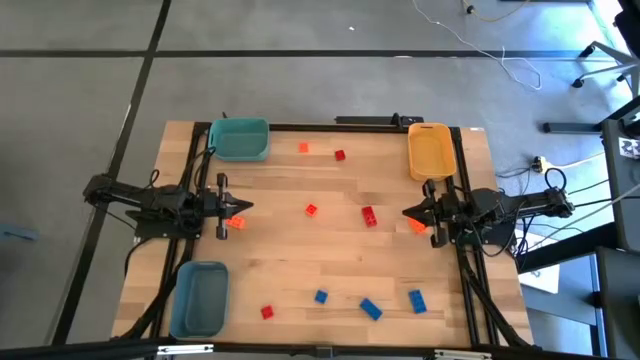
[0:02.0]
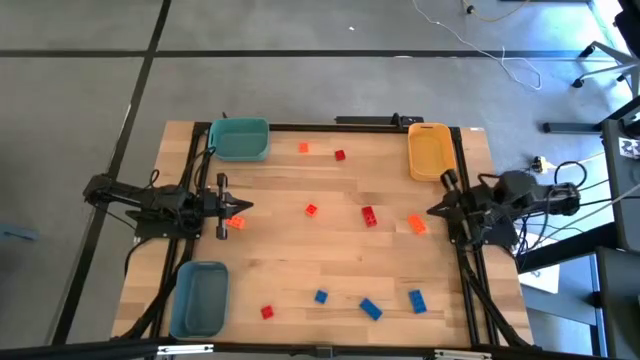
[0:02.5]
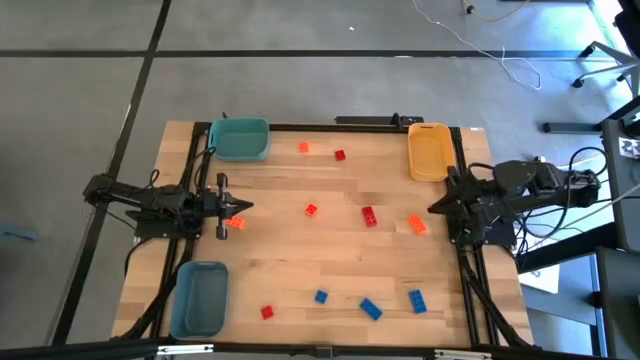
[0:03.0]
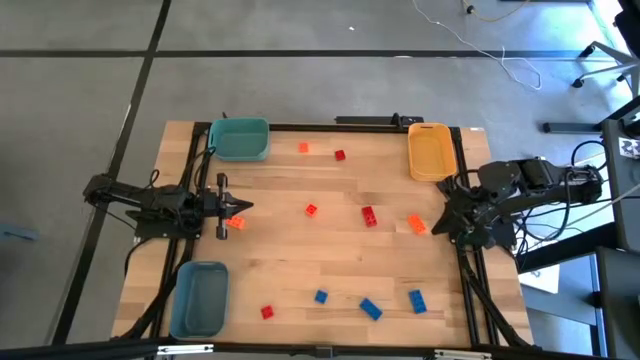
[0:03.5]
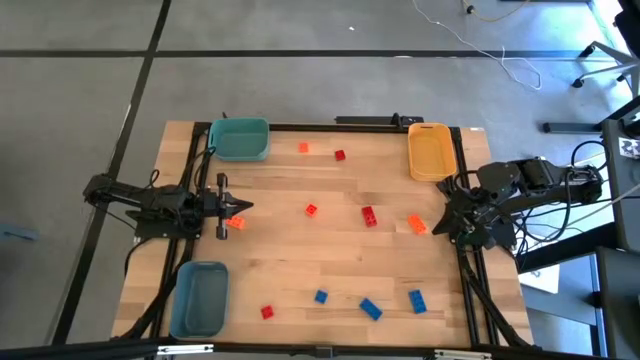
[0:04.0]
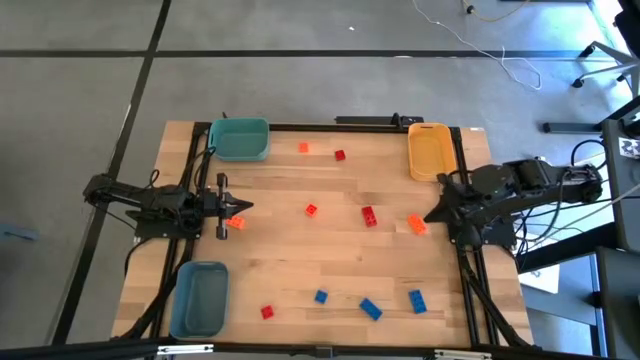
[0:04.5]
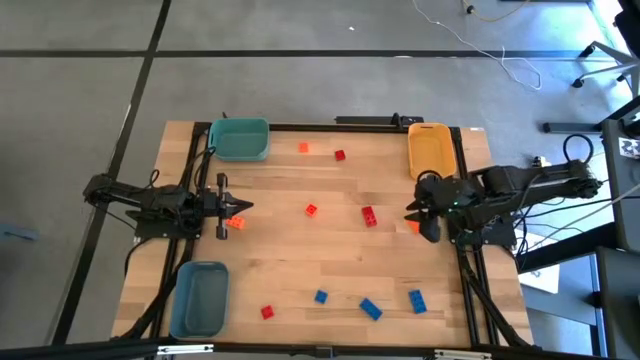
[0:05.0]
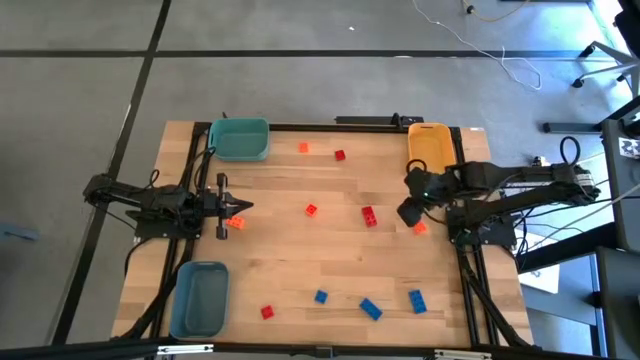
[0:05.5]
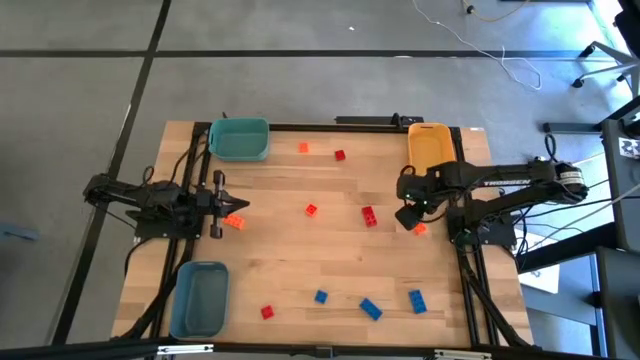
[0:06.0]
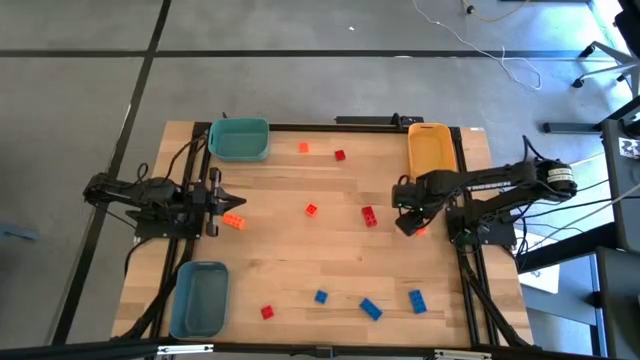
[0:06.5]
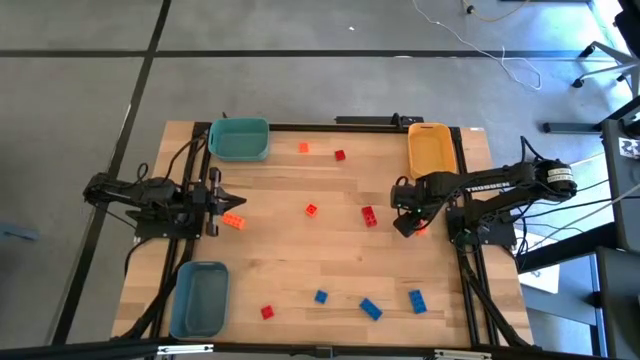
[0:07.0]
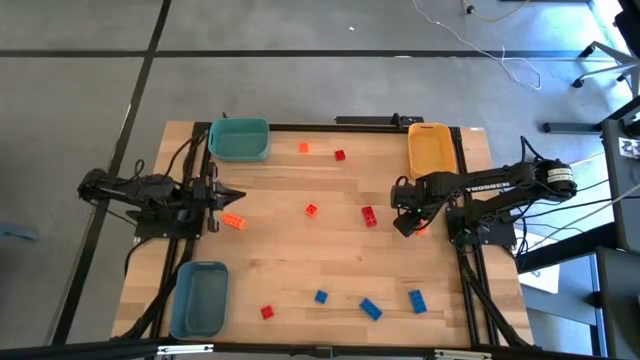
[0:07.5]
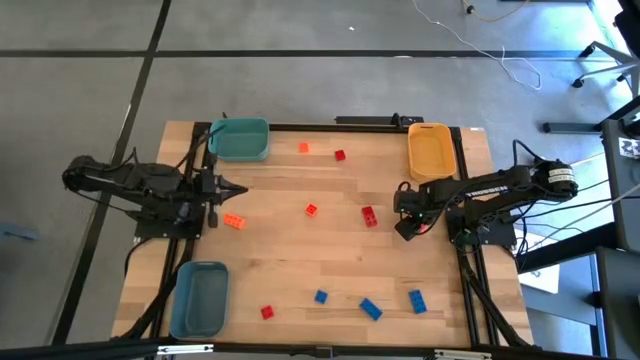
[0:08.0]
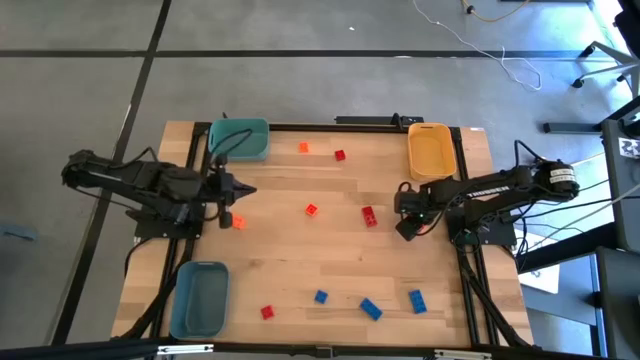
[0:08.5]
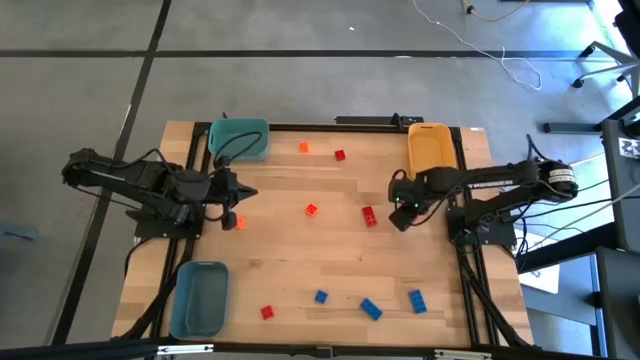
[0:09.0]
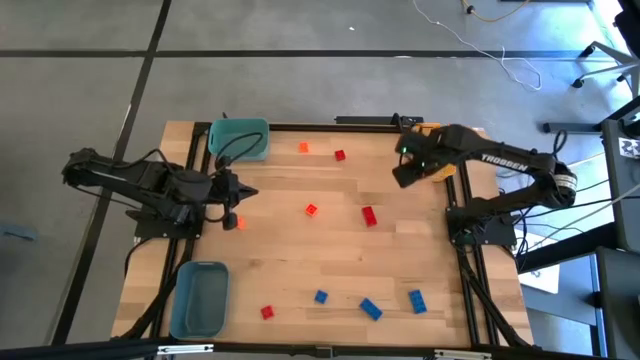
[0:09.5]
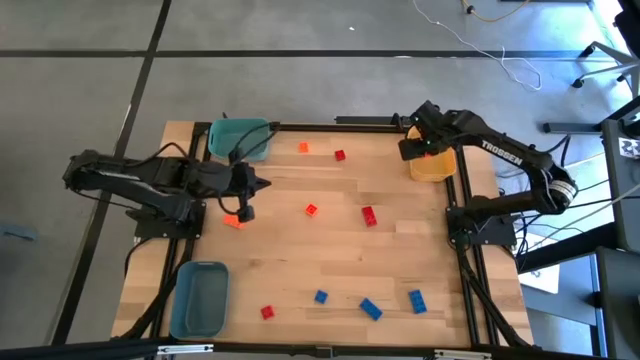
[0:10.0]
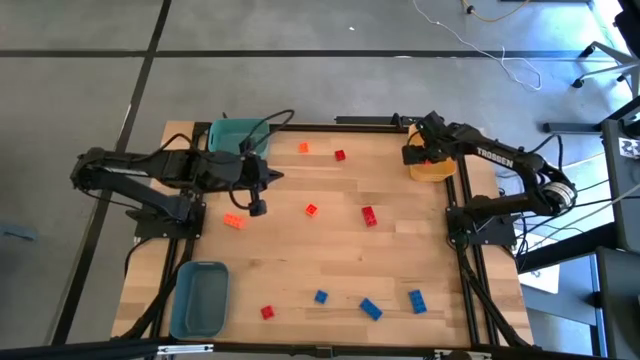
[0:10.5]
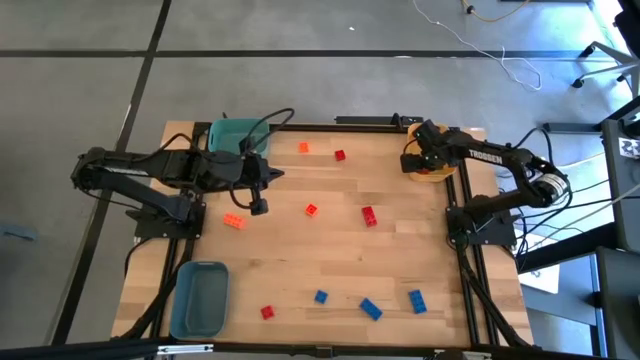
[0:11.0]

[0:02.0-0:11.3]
Task: Sort & place blocks by color
Put the orange game piece into the yellow bin

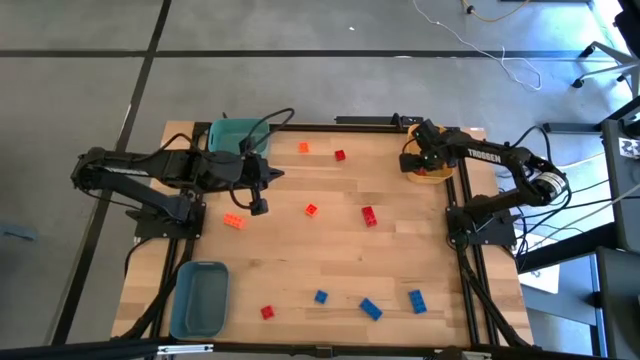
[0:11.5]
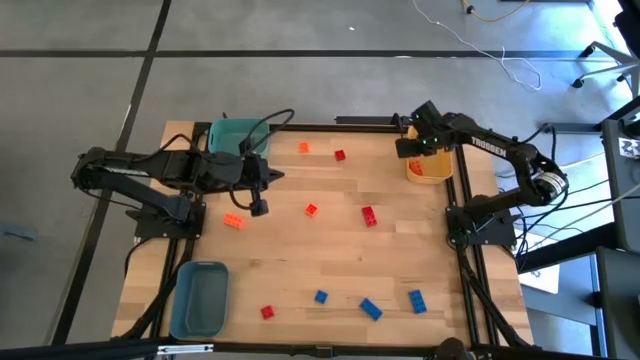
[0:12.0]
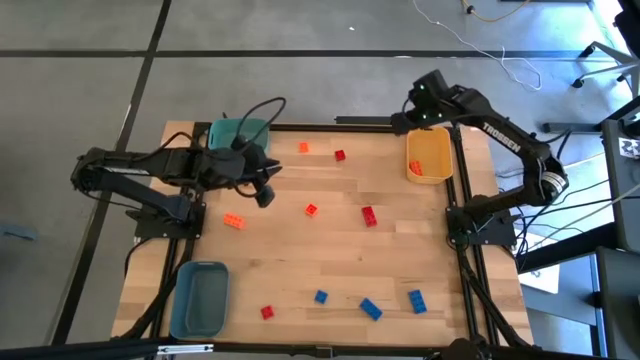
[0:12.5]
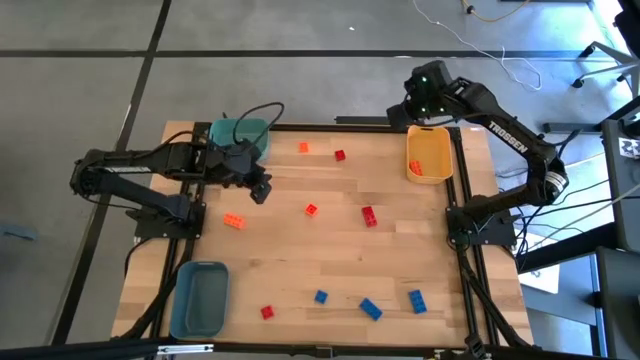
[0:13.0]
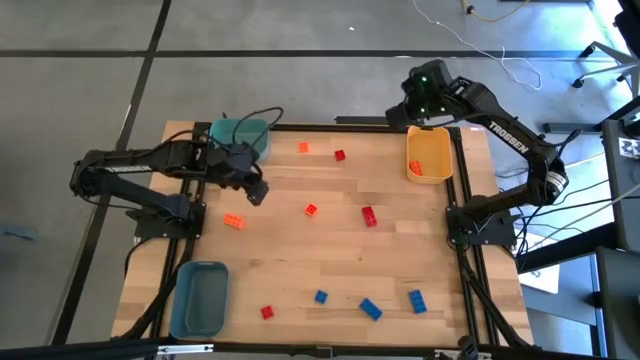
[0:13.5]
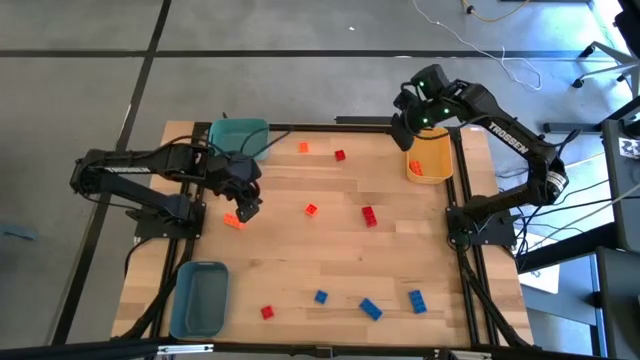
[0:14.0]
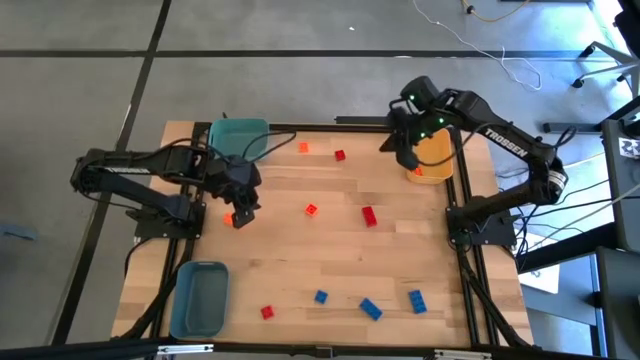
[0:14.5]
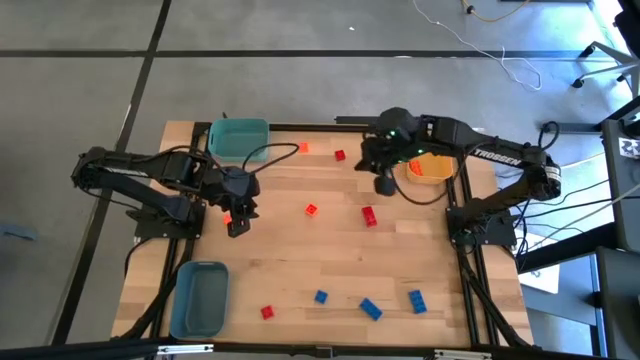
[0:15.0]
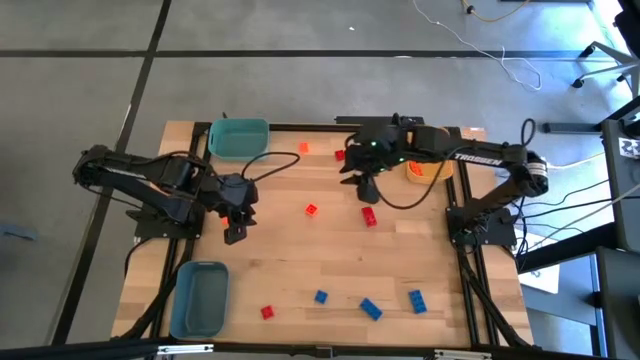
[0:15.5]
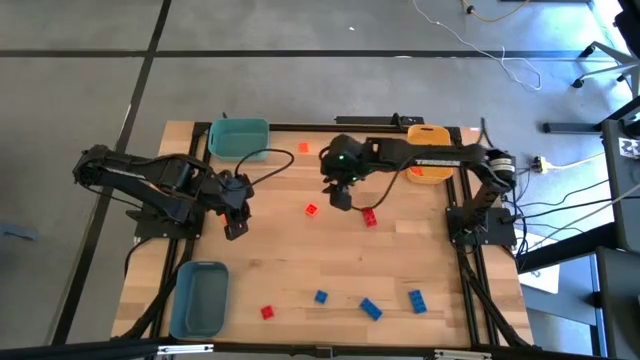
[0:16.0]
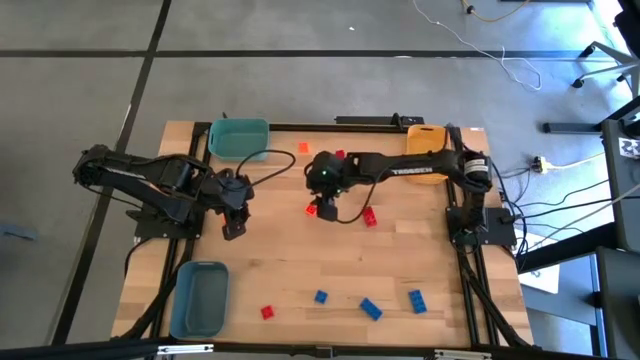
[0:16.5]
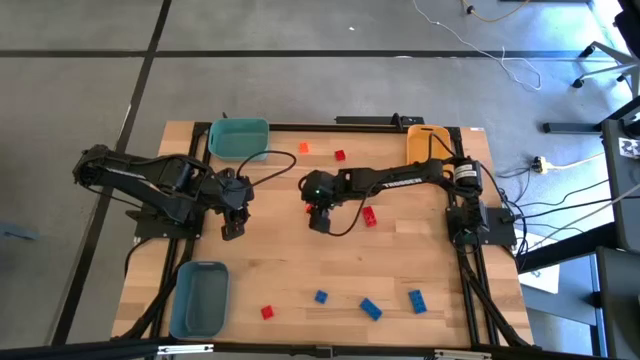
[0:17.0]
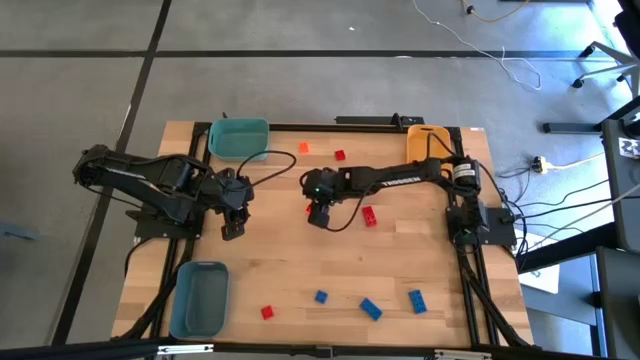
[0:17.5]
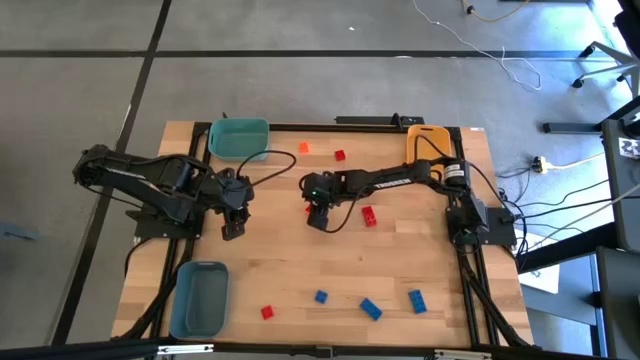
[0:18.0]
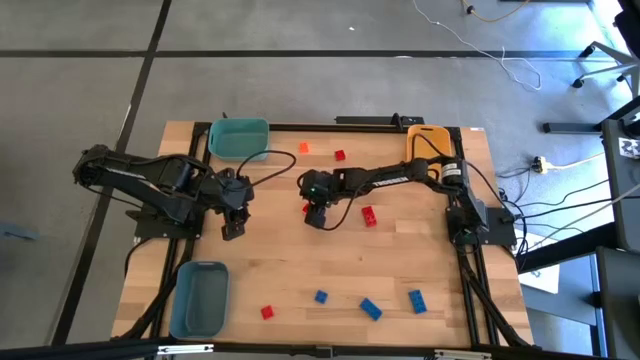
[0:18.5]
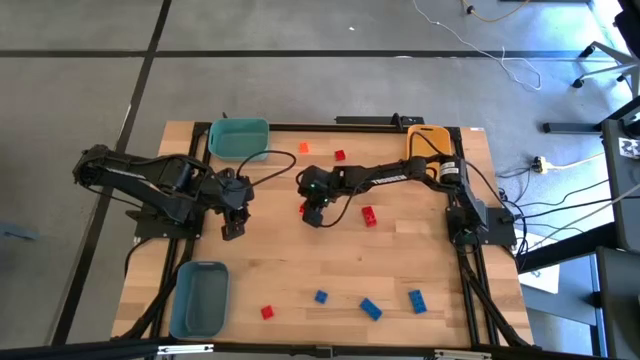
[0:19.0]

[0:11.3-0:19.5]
Put the orange game piece into the yellow bin

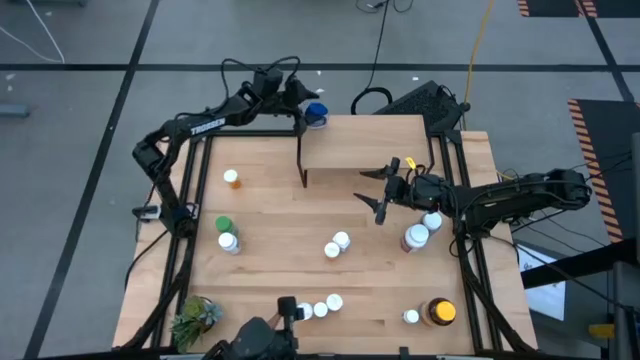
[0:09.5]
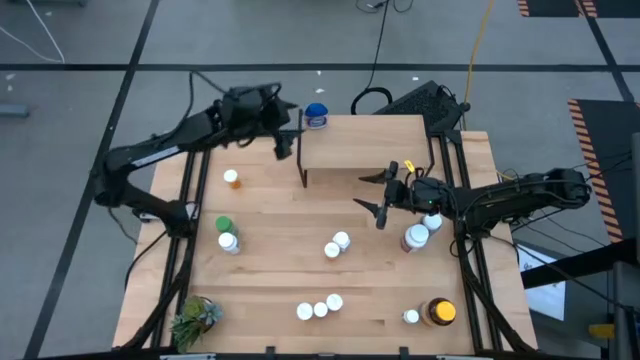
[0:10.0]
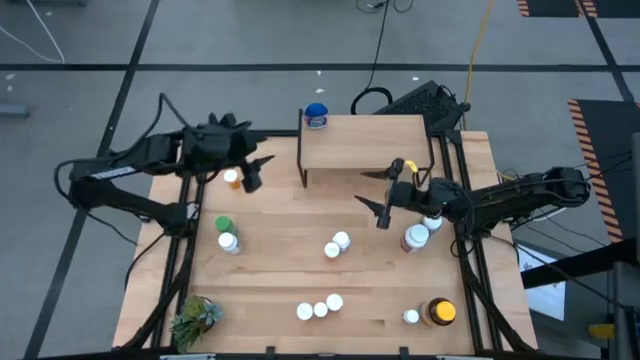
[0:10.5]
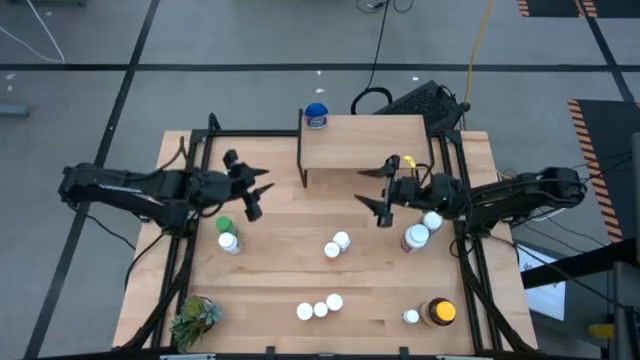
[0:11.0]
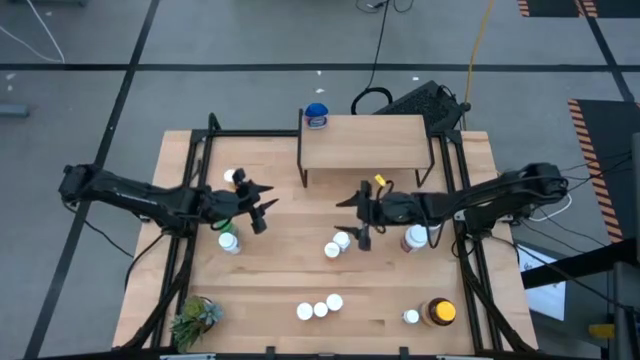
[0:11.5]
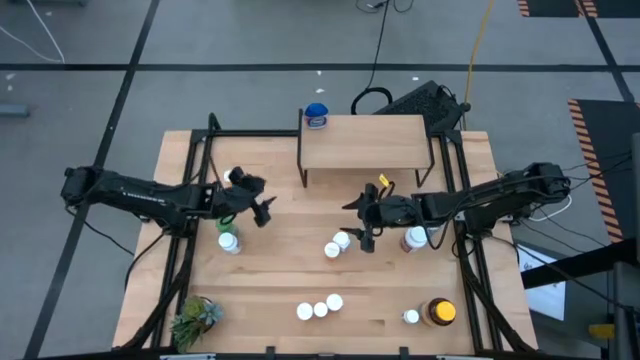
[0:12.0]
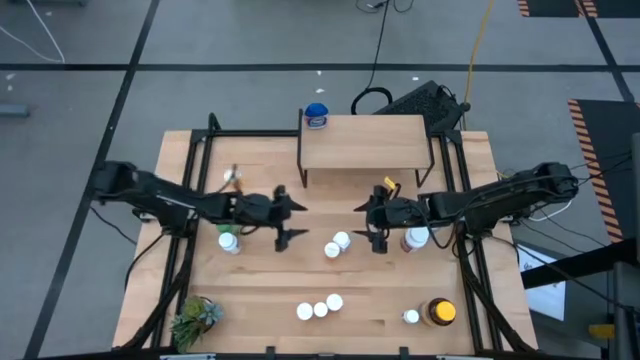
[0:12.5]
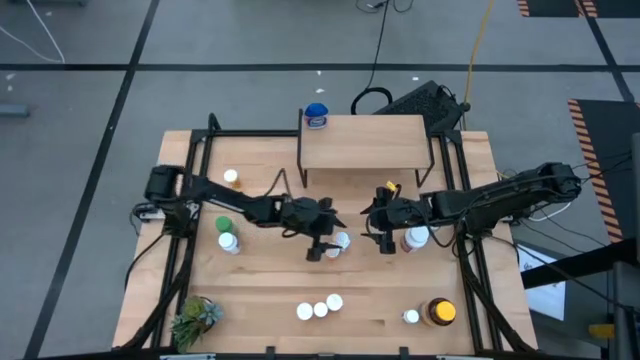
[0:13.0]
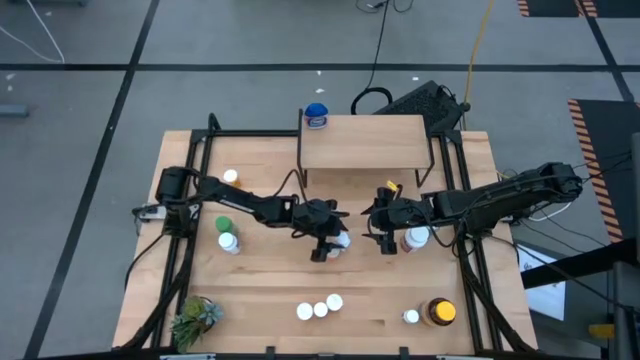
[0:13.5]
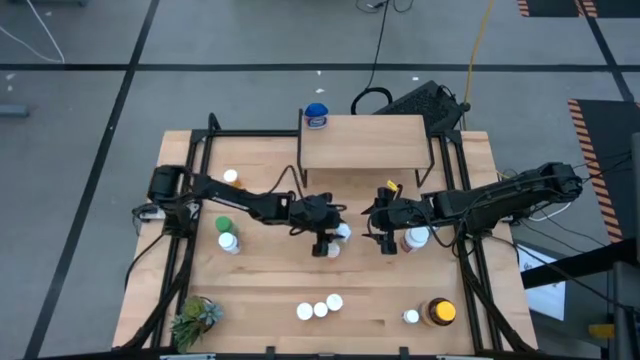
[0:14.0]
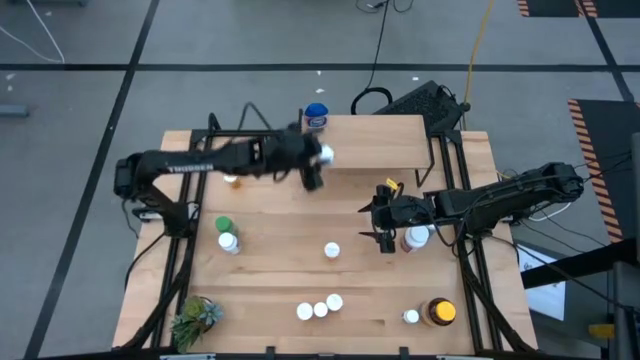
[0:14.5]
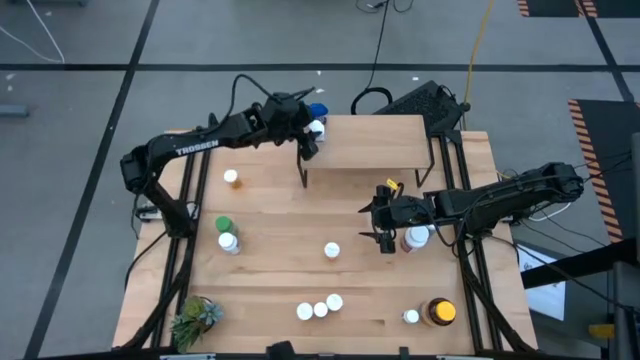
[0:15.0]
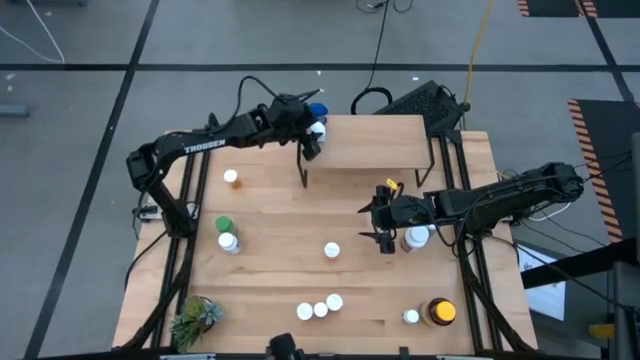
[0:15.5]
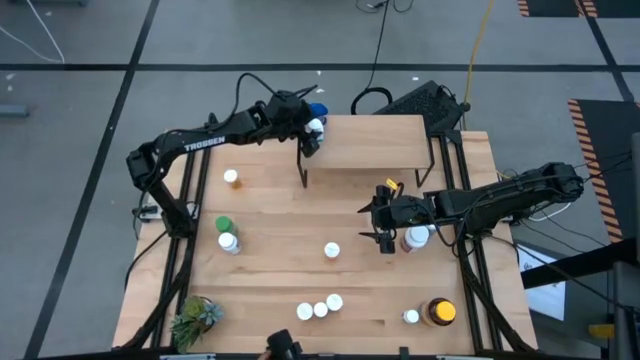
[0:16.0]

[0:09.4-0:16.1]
Task: Pick and place medicine bottles onto shelf by color
Put the white bottle on the shelf
